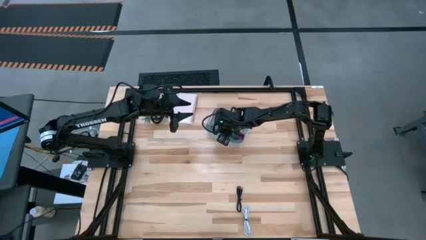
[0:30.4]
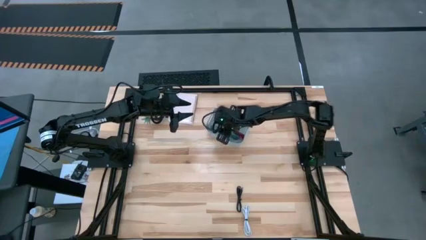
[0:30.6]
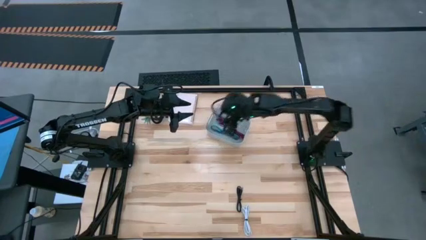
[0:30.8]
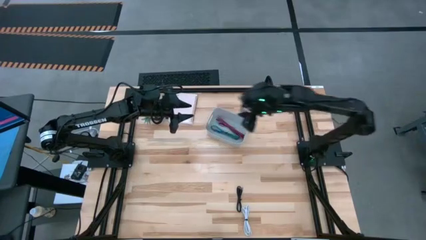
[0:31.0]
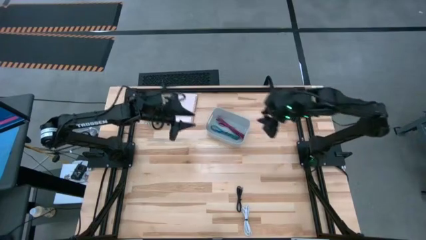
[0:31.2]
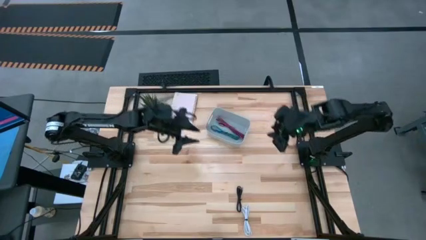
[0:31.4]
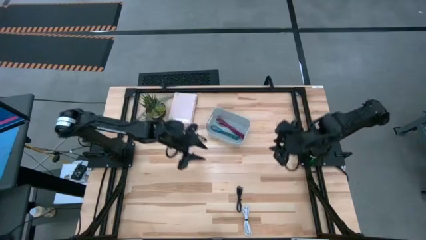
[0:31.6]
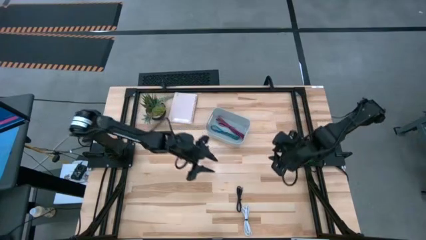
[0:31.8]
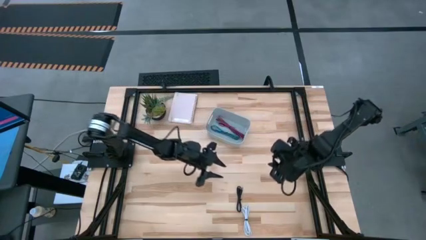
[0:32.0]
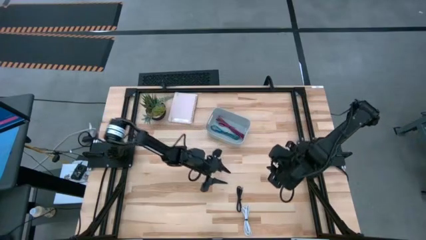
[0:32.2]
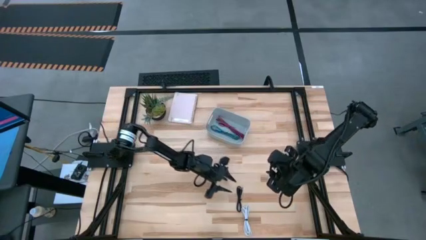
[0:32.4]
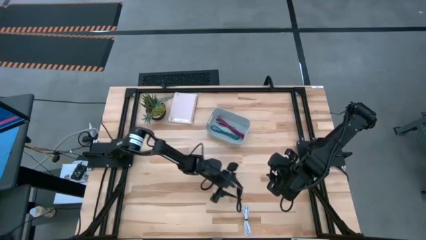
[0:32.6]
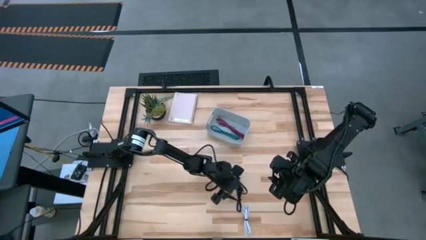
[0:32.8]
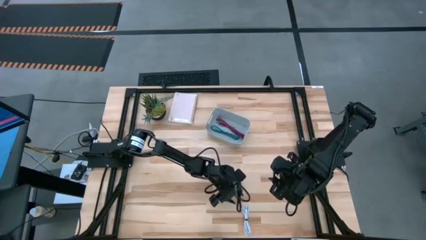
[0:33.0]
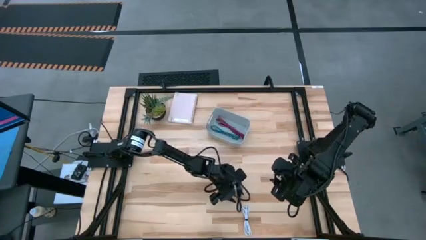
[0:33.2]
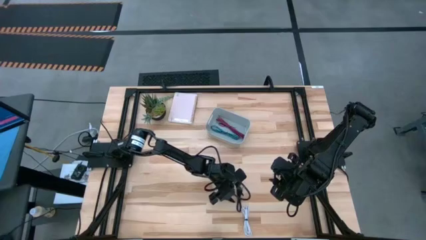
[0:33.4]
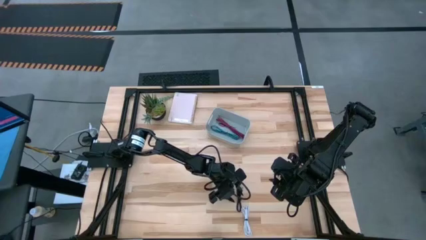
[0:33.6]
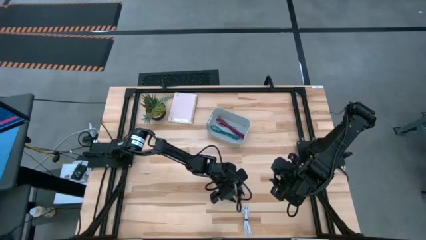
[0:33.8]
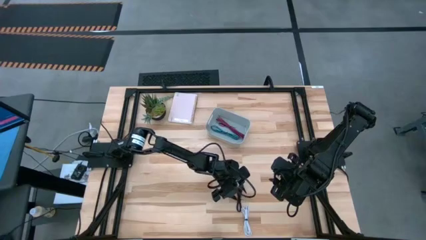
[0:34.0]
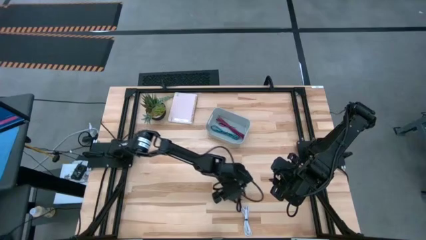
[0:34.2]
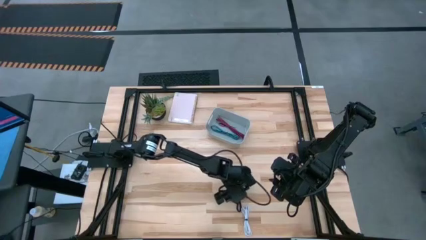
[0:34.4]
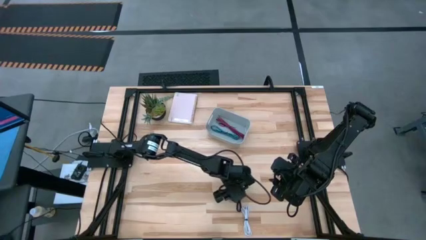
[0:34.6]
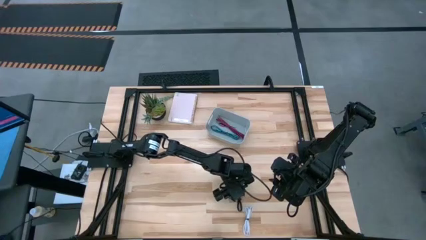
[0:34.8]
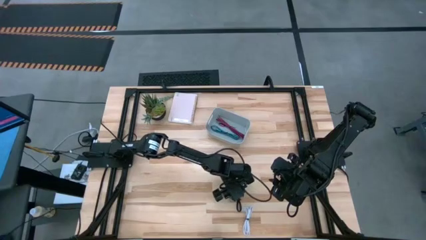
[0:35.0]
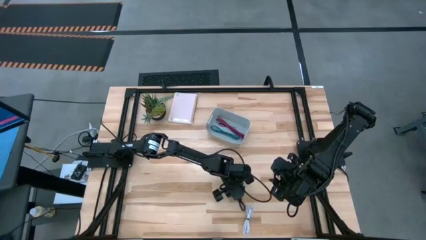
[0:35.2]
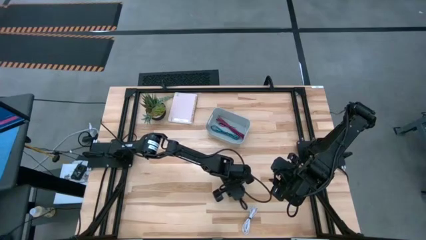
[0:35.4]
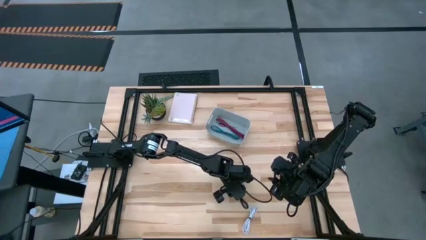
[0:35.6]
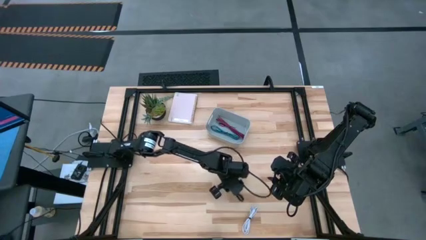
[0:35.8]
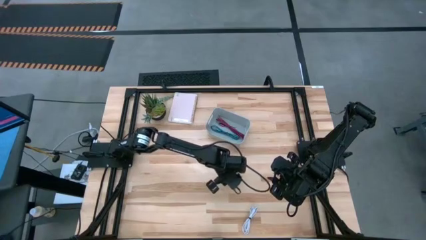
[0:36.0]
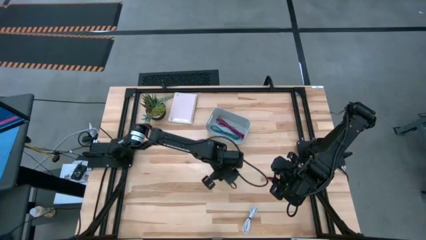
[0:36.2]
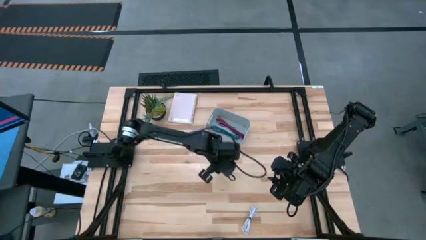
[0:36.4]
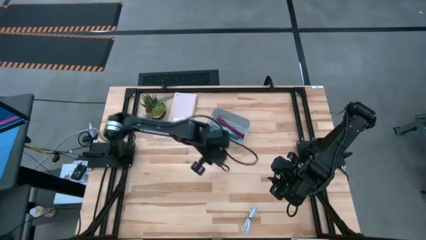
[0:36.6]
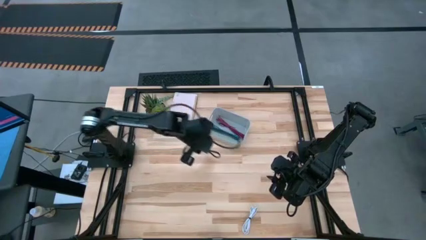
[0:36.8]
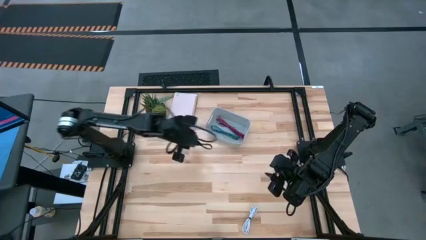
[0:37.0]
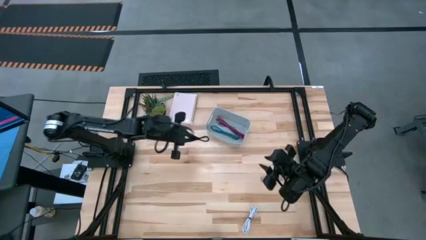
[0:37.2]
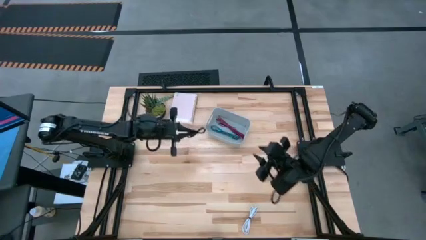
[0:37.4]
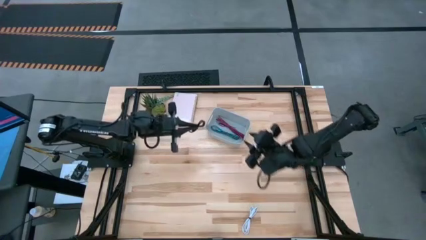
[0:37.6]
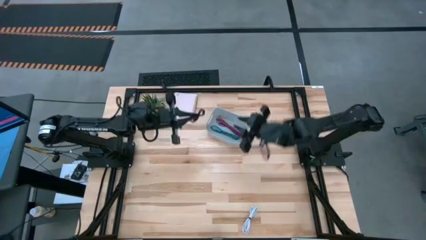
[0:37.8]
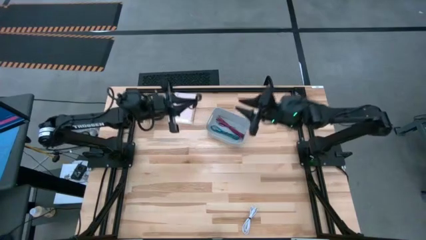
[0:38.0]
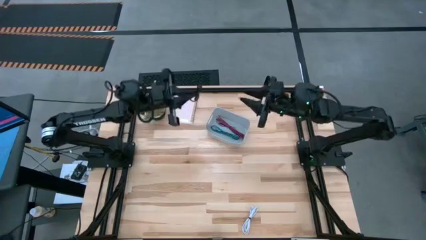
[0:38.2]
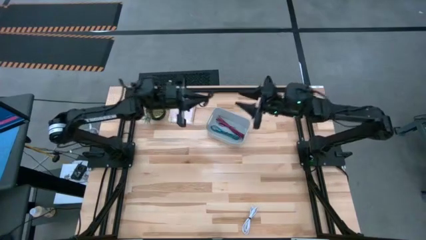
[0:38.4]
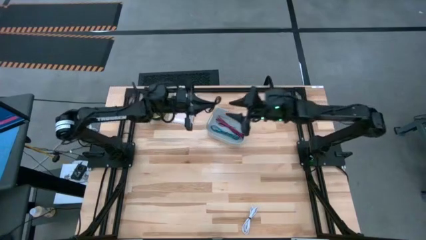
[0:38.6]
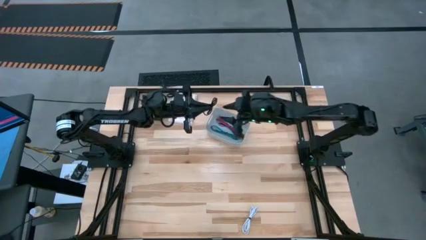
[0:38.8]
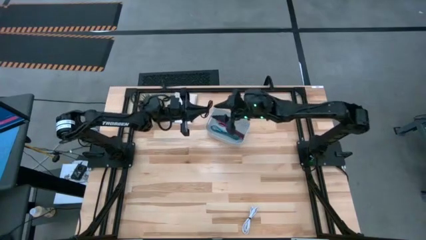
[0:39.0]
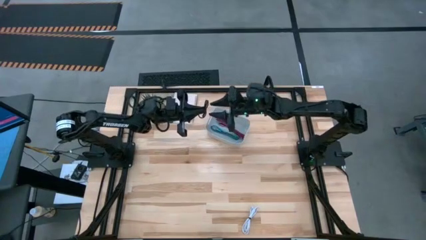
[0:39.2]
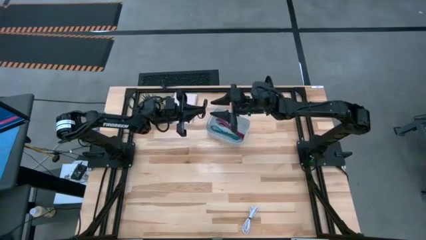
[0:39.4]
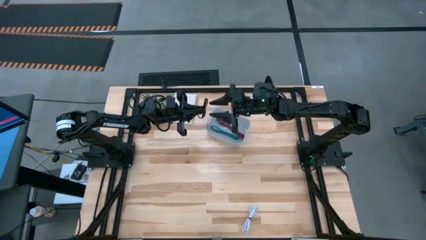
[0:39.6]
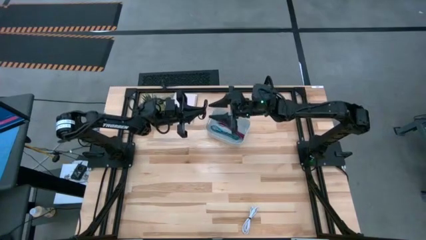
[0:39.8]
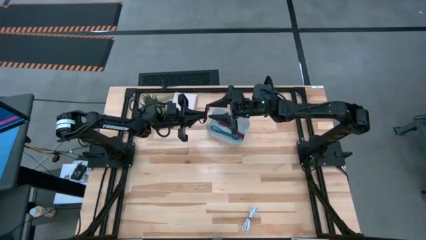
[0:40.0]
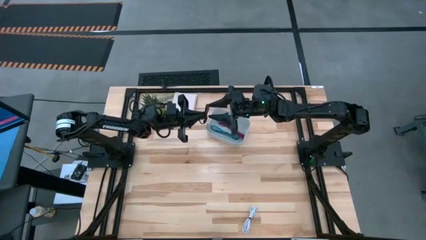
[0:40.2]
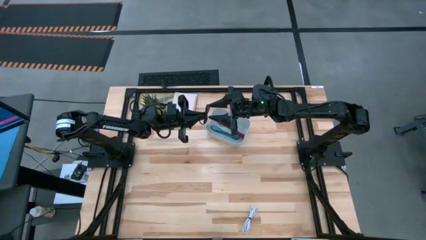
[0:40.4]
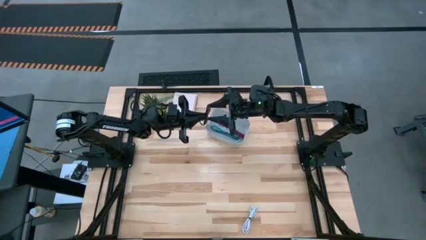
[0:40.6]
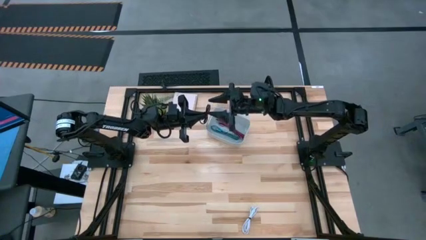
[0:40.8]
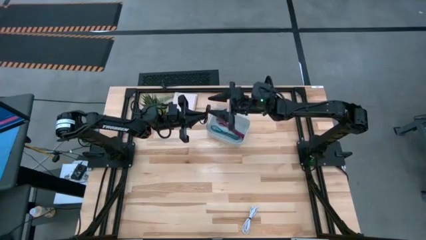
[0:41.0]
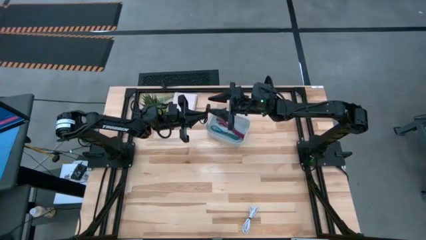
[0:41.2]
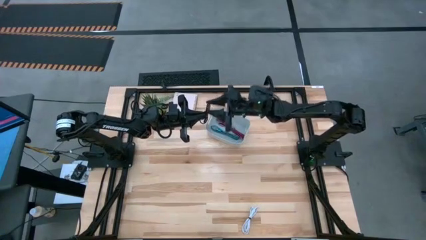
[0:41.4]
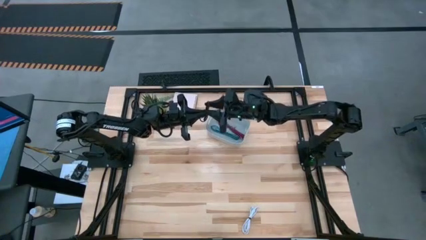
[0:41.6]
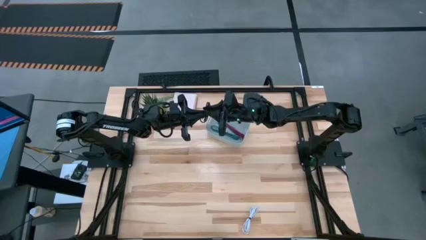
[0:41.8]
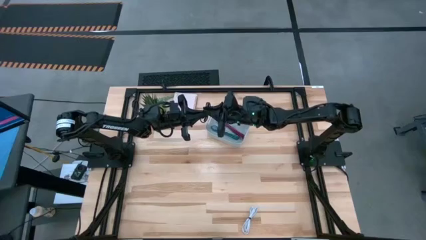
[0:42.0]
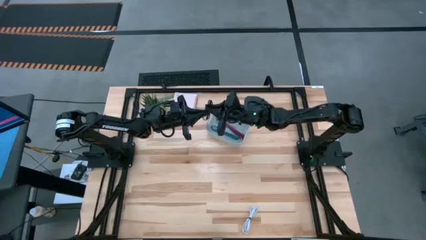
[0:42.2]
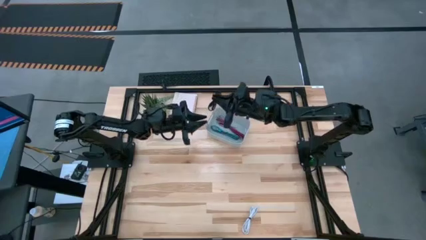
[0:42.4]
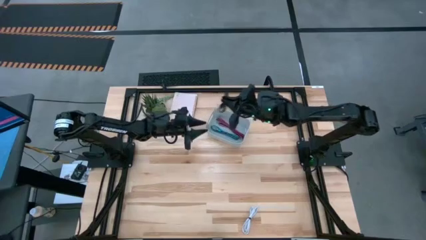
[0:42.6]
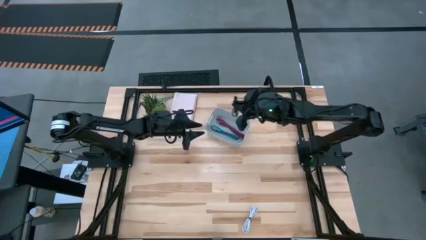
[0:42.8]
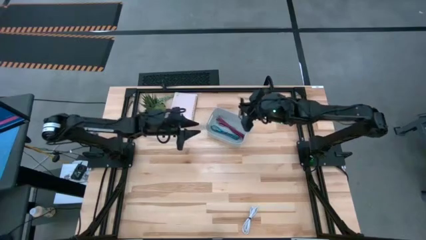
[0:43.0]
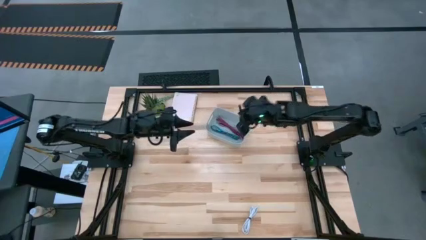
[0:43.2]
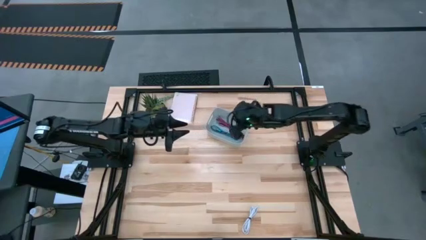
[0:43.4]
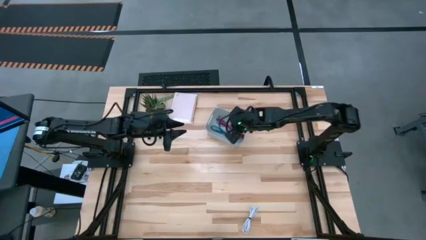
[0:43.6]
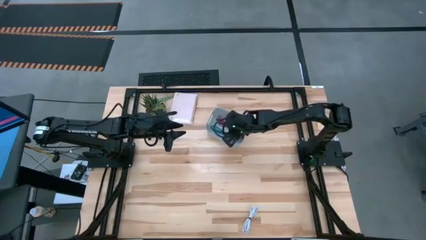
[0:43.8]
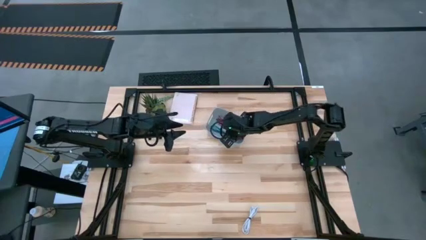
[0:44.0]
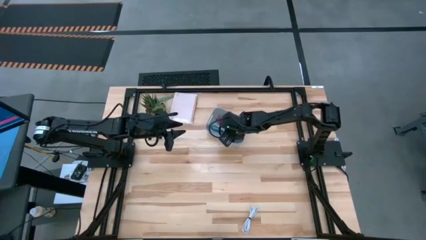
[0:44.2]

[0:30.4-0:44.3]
Task: Pick and place USB-C Cables
Put the black charger cable into the gray bin
